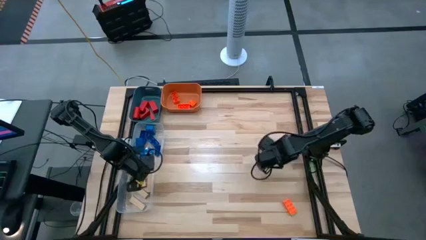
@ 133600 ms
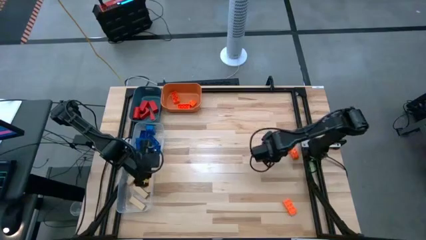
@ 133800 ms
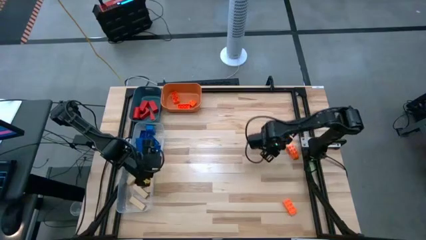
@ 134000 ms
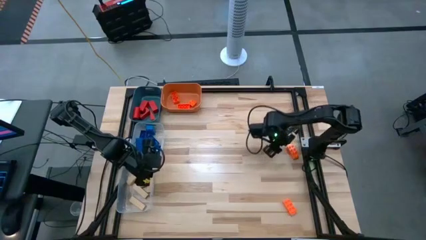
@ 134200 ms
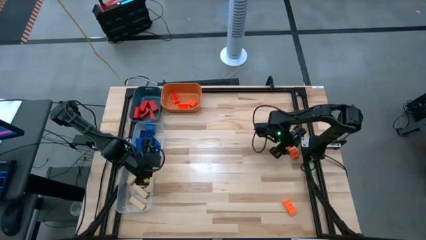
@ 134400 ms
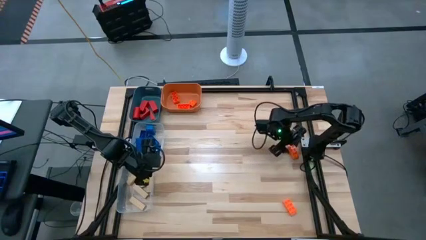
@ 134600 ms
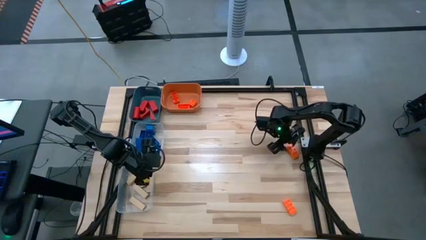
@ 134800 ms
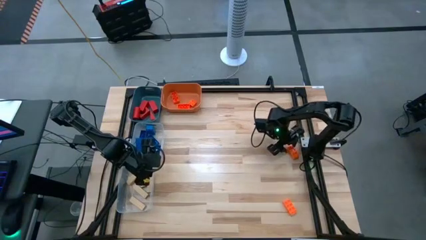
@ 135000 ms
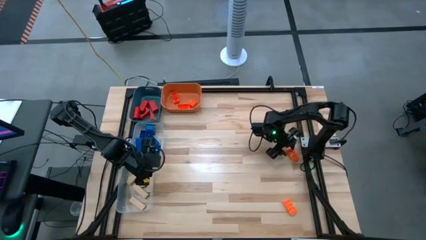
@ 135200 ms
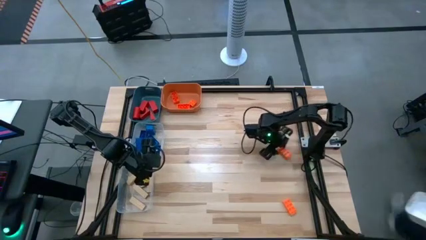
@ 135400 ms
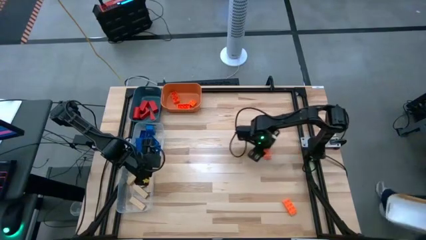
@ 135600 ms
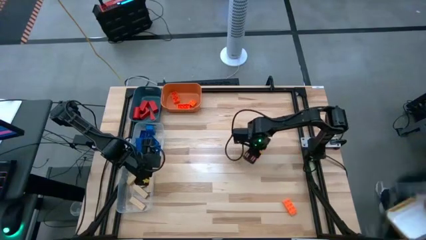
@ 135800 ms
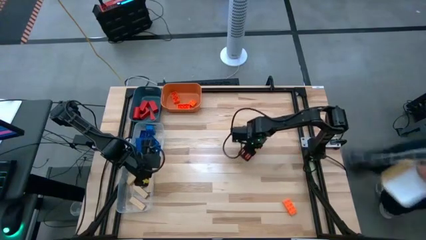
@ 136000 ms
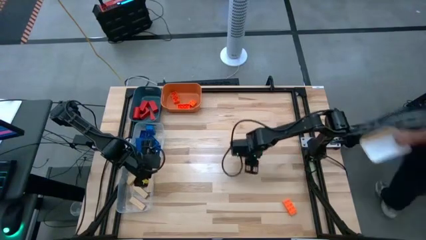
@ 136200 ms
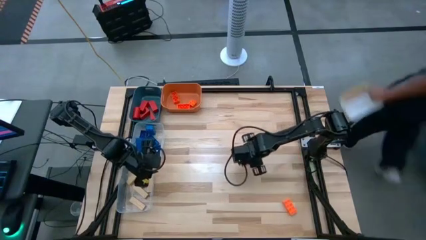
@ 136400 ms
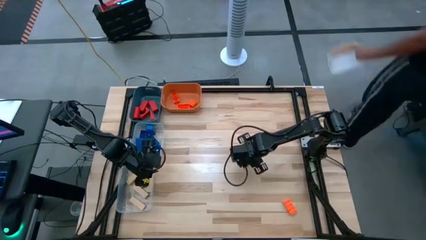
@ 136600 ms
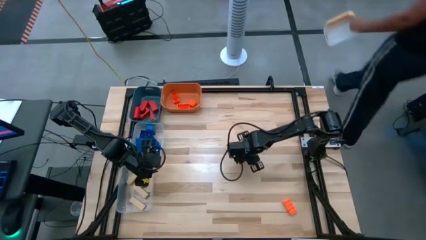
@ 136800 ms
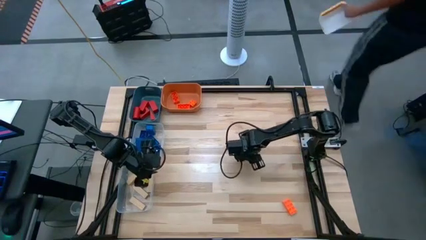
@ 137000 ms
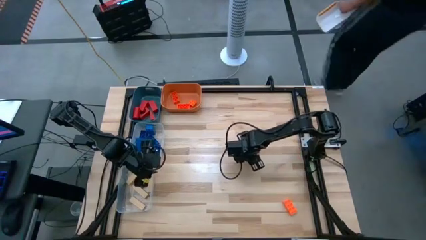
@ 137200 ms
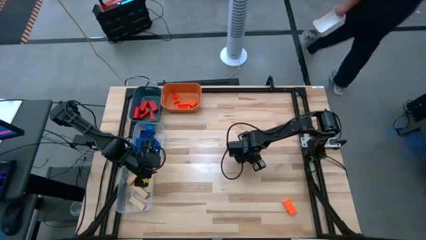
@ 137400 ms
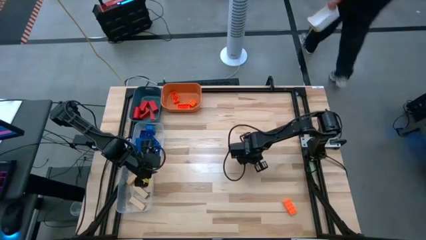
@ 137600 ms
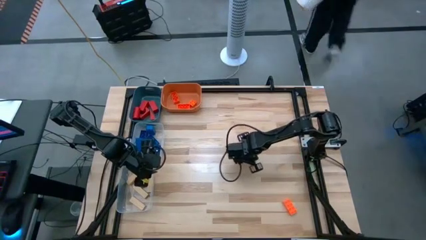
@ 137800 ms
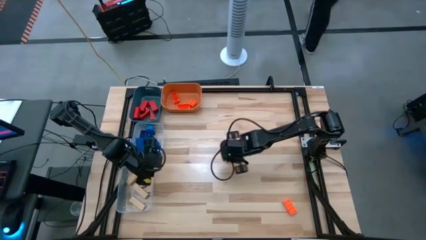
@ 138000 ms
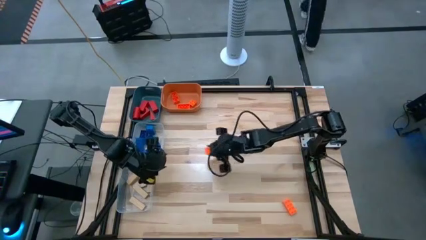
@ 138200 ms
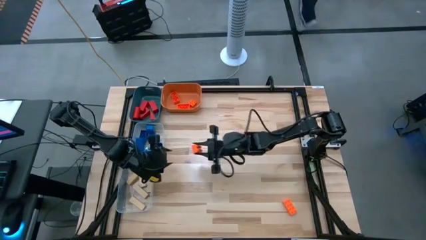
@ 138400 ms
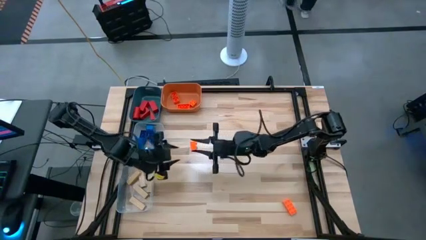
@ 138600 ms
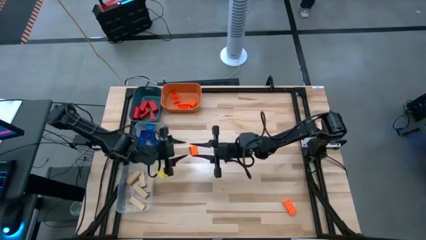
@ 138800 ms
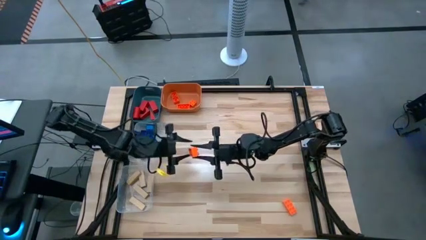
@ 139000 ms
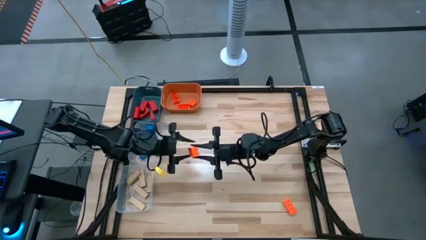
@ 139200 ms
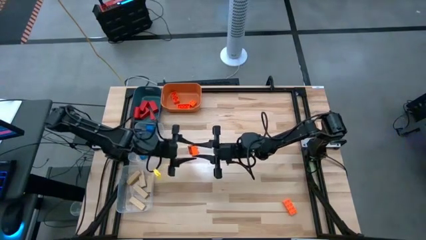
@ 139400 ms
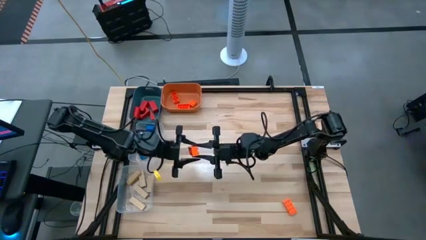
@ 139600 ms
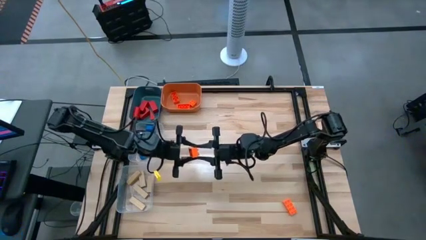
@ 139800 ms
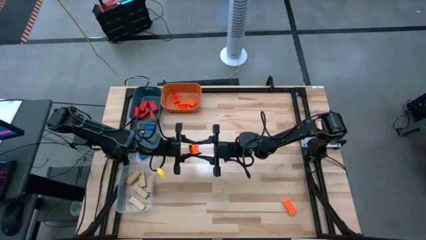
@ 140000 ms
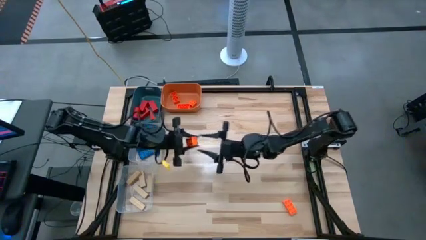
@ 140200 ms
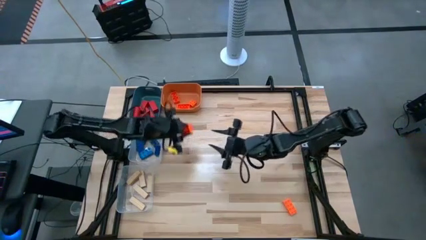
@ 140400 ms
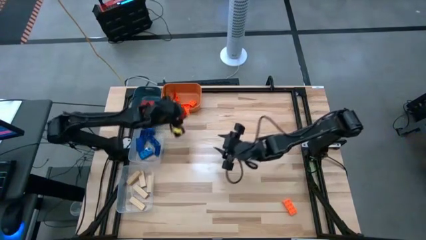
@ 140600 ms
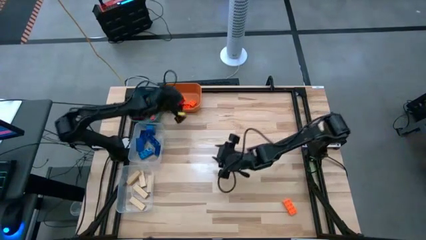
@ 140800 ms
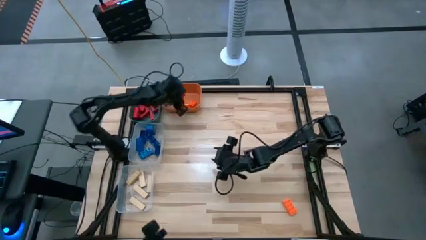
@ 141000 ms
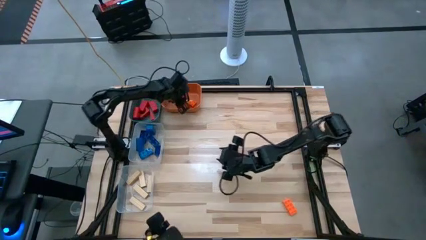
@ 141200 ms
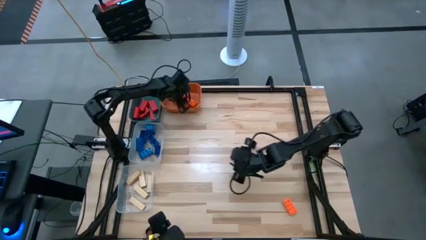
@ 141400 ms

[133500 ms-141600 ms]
Task: Sort blocks
Put the orange game piece into the orange bin

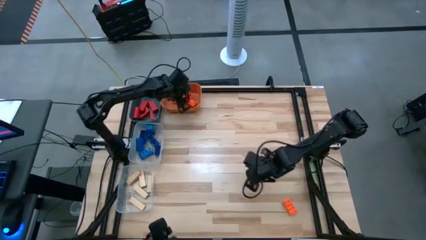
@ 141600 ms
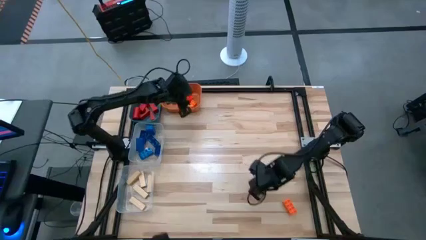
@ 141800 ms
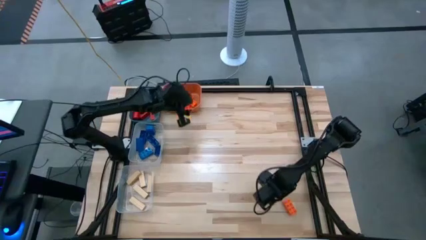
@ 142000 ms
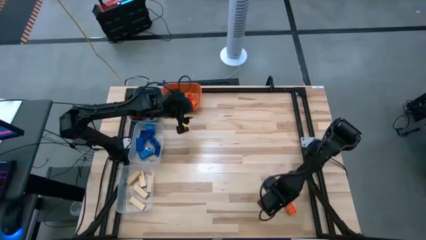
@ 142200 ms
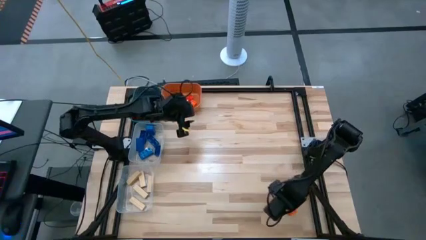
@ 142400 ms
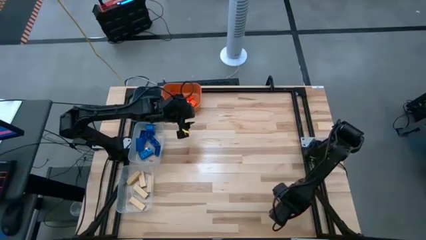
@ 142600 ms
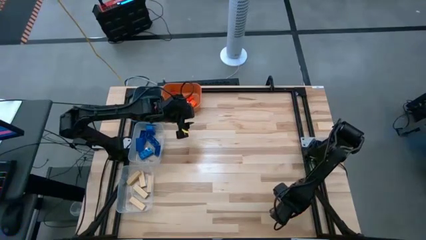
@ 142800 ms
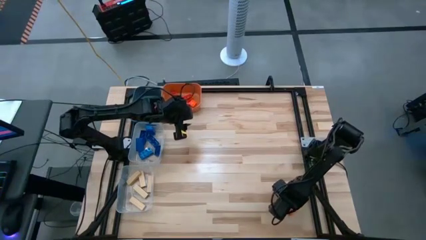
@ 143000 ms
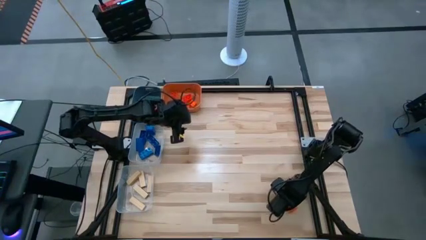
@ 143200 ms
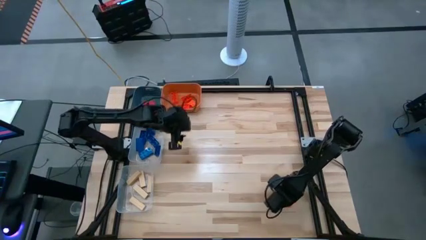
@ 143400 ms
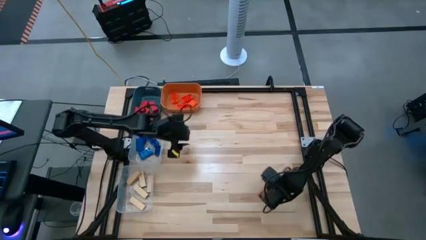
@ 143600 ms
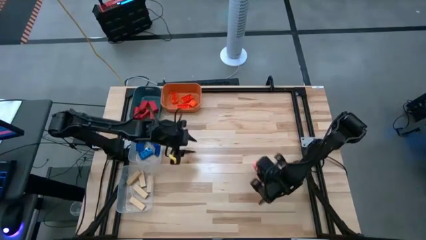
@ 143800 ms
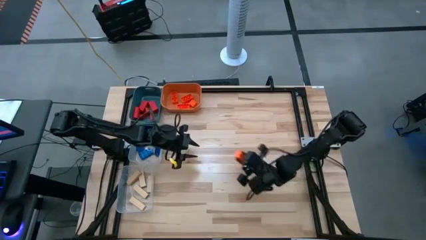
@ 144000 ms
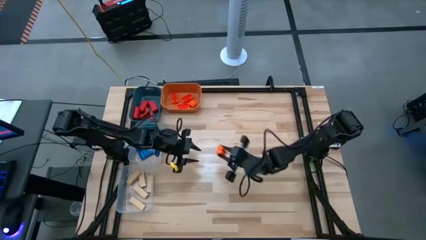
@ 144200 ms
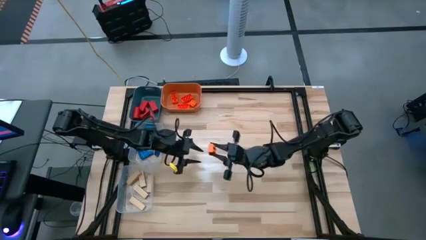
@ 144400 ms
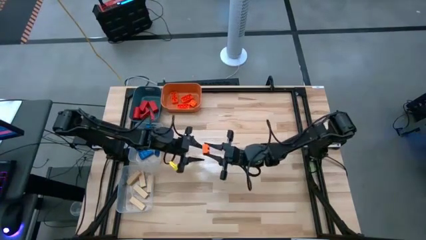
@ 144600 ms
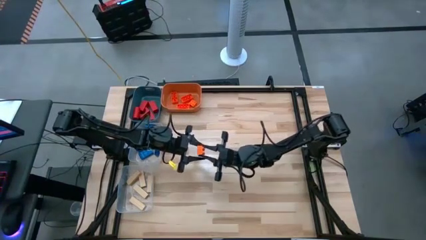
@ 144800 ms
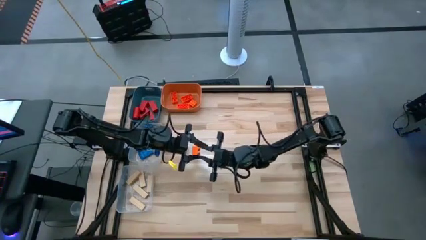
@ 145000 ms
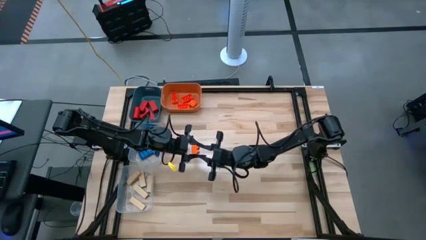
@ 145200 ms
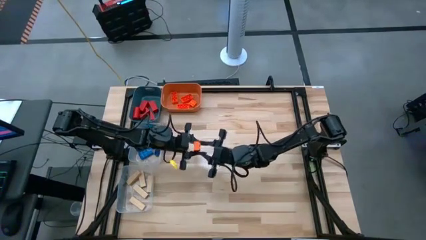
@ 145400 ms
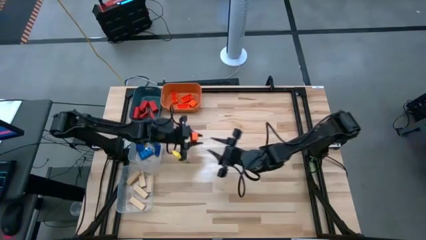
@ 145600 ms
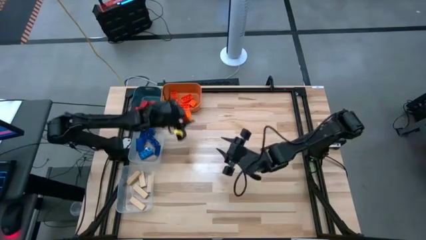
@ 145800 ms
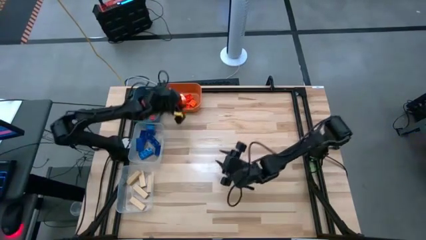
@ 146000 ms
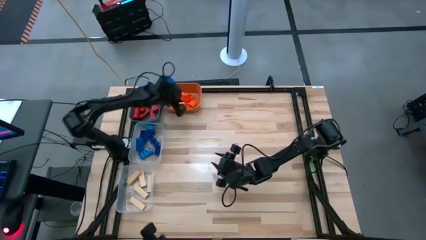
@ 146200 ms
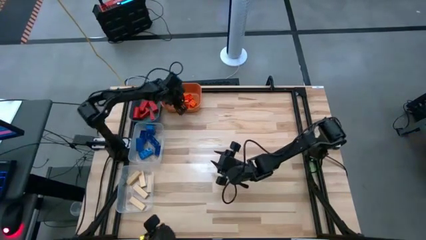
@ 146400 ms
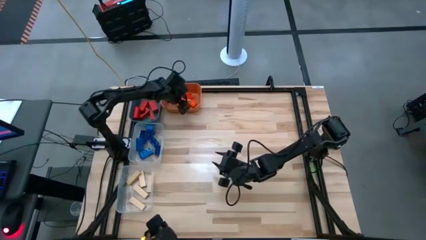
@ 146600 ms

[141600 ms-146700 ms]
Put the orange game piece into the orange bin

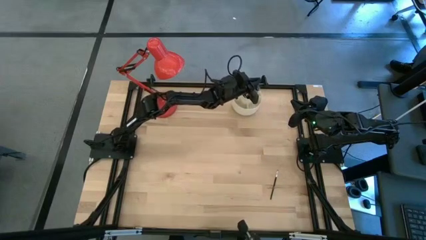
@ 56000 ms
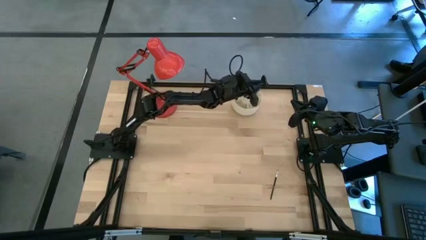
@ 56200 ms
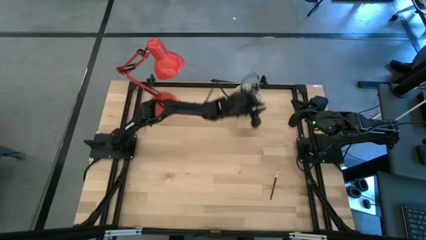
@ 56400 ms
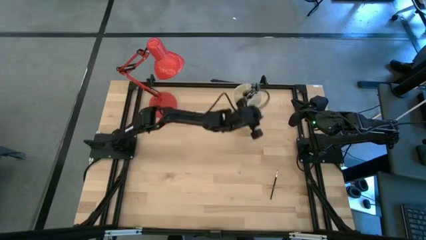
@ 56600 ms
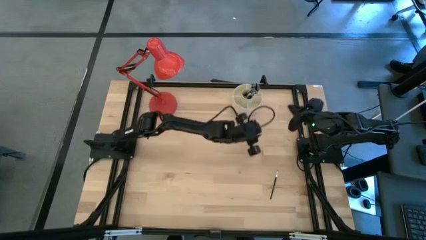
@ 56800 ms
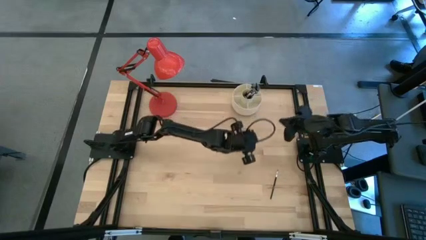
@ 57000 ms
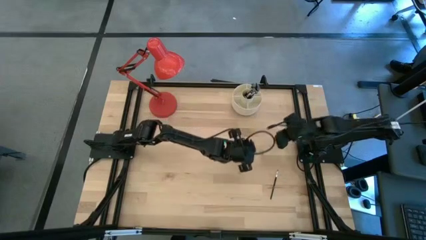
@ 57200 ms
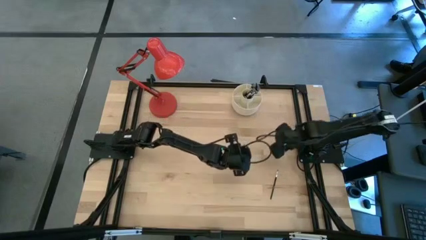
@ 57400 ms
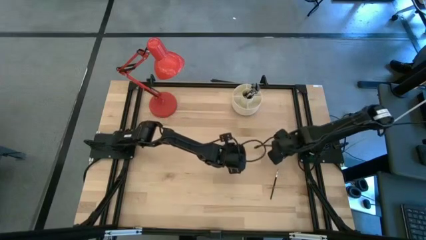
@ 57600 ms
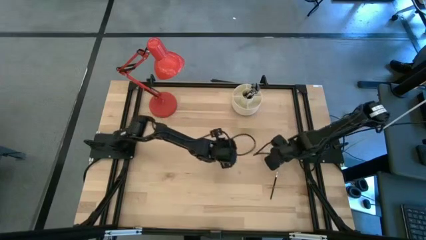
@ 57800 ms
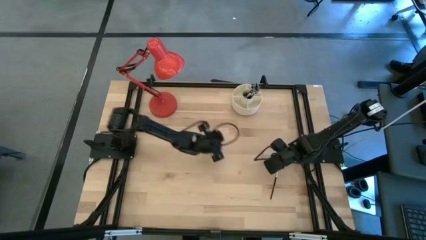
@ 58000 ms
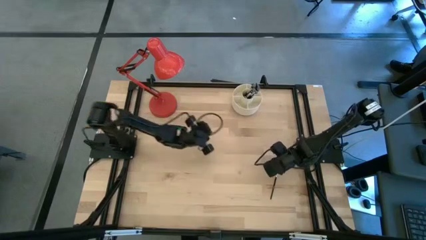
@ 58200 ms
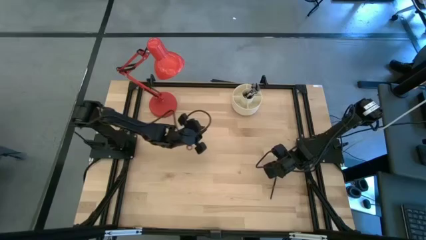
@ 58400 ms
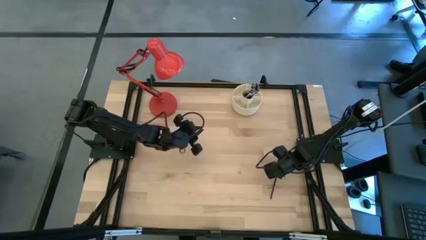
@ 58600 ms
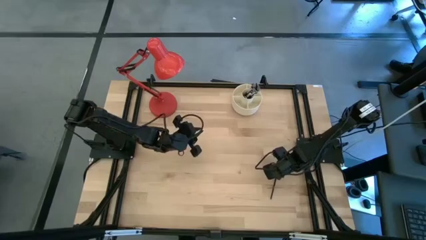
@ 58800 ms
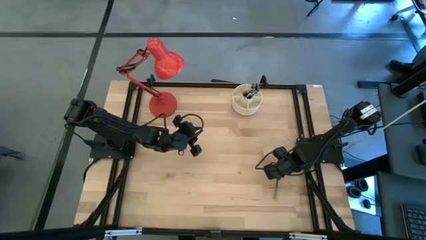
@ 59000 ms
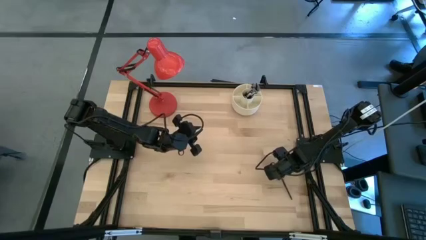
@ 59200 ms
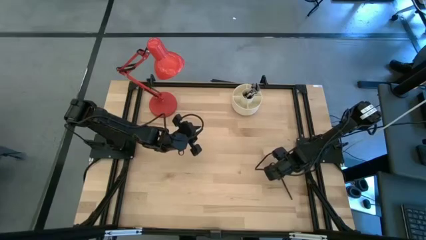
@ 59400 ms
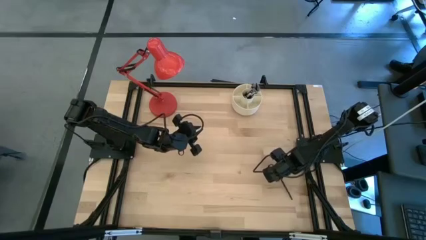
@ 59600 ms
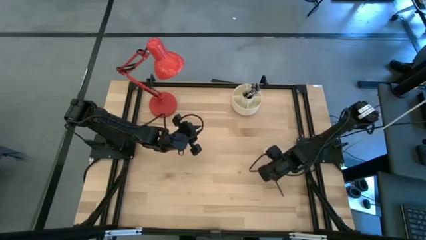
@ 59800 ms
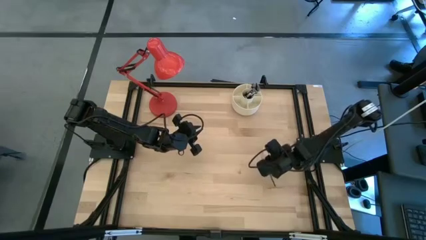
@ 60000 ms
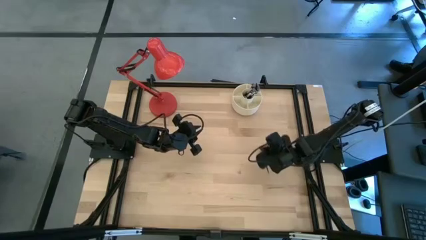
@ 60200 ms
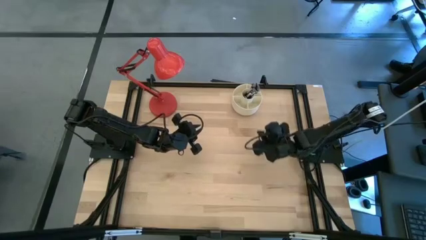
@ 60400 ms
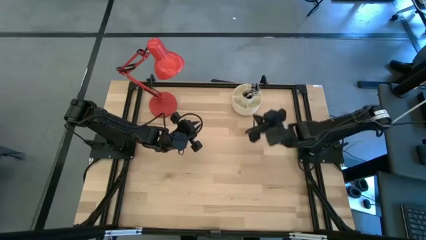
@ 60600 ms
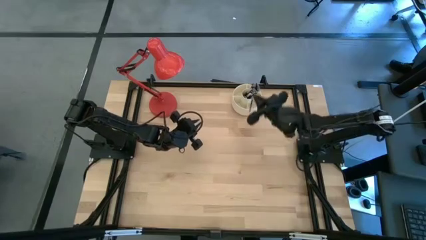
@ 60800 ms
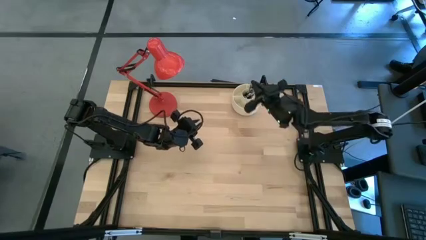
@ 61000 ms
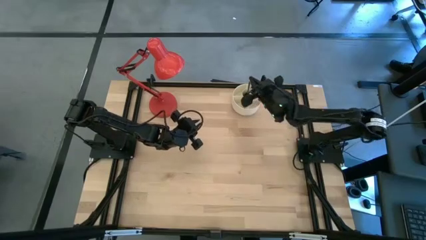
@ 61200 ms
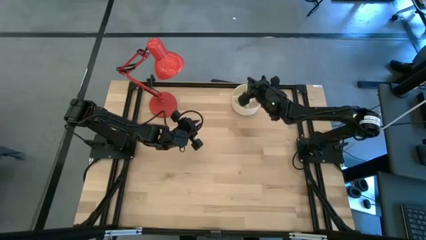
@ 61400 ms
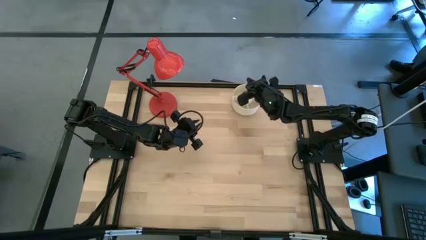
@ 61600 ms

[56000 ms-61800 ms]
Task: Put items in baskets/containers
Put the black eyeshadow brush into the white organizer
